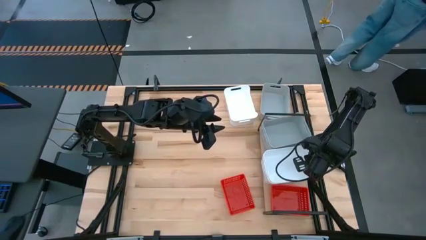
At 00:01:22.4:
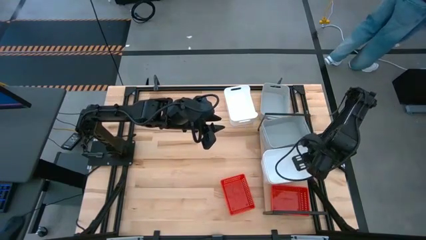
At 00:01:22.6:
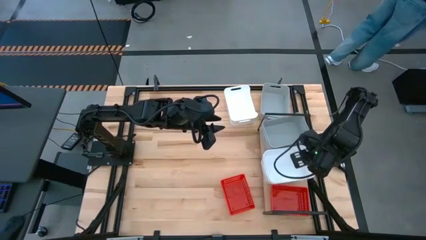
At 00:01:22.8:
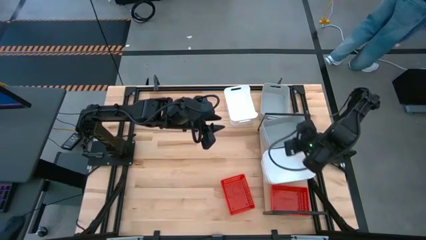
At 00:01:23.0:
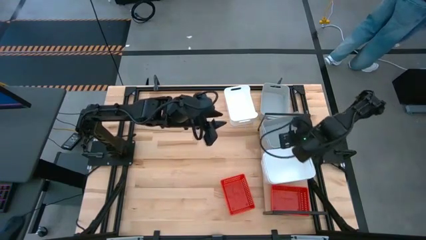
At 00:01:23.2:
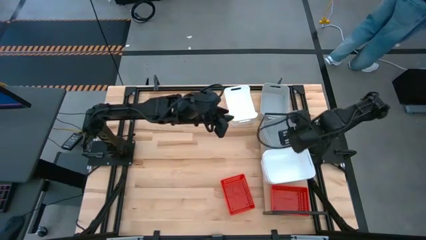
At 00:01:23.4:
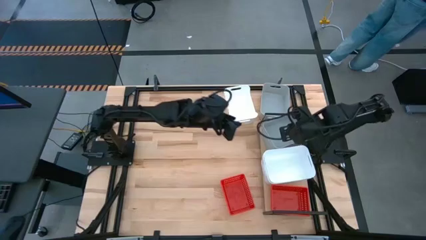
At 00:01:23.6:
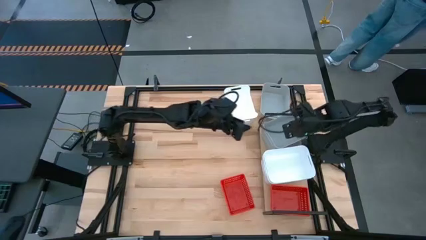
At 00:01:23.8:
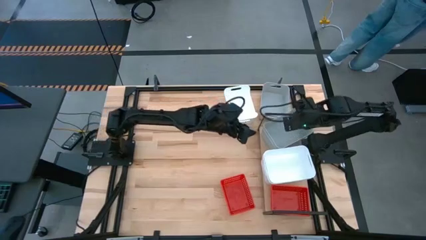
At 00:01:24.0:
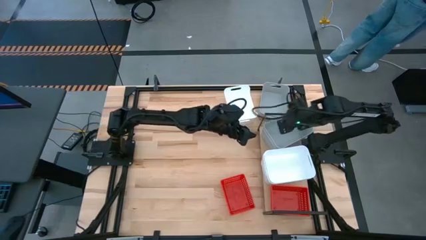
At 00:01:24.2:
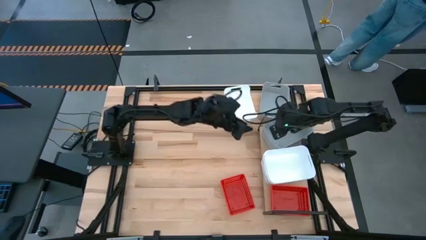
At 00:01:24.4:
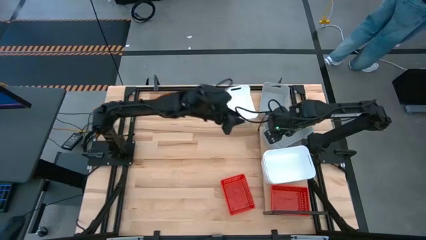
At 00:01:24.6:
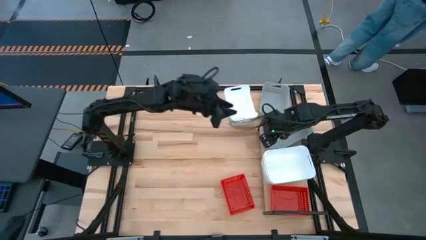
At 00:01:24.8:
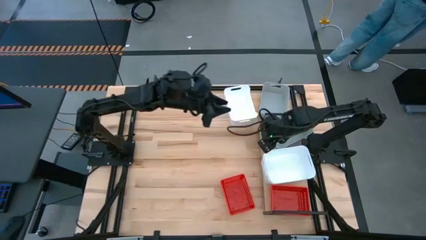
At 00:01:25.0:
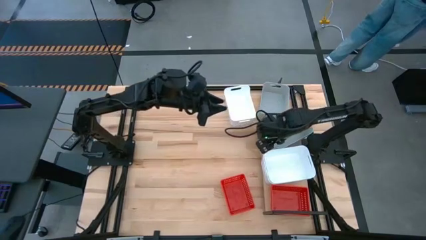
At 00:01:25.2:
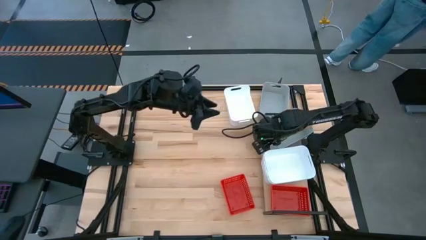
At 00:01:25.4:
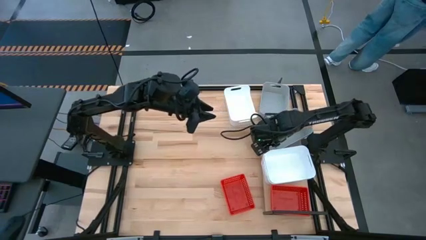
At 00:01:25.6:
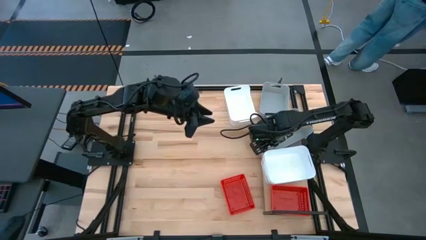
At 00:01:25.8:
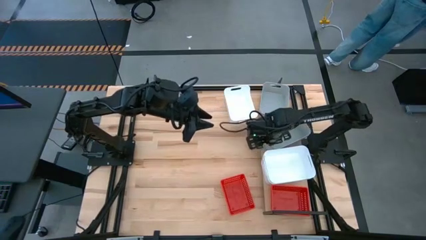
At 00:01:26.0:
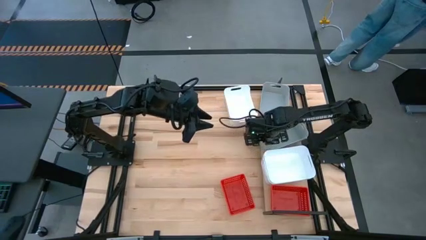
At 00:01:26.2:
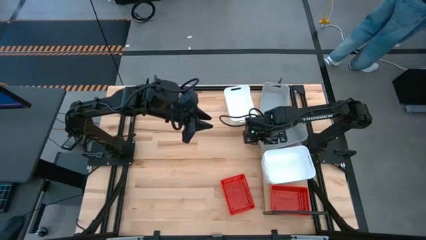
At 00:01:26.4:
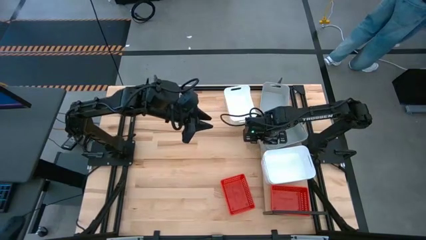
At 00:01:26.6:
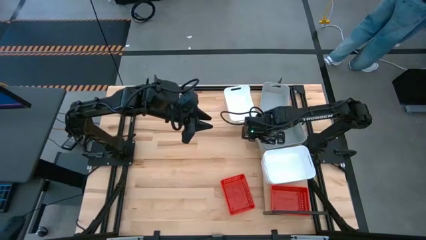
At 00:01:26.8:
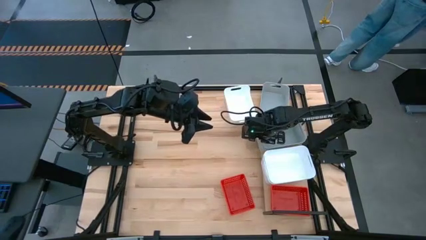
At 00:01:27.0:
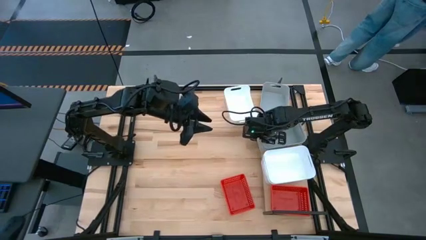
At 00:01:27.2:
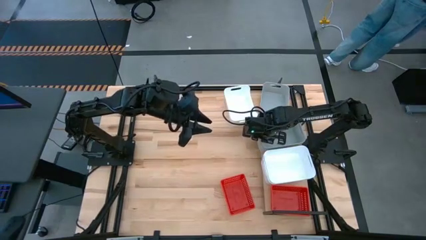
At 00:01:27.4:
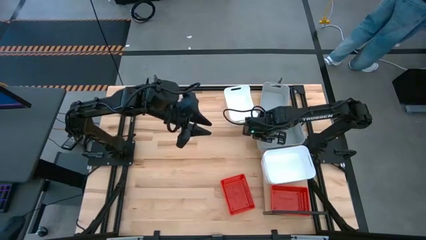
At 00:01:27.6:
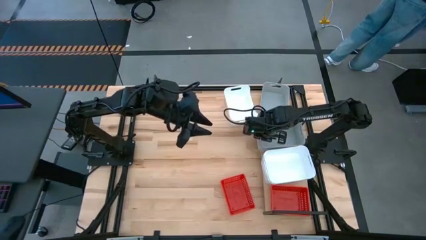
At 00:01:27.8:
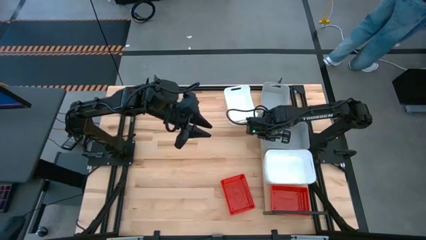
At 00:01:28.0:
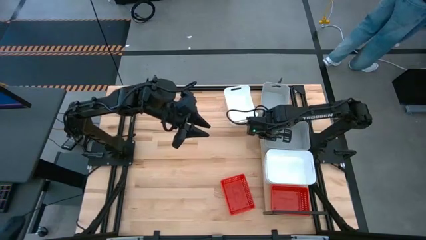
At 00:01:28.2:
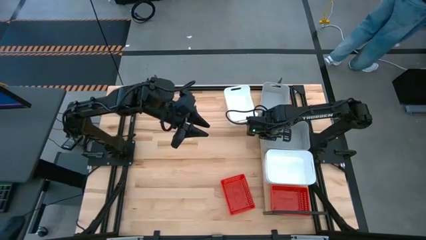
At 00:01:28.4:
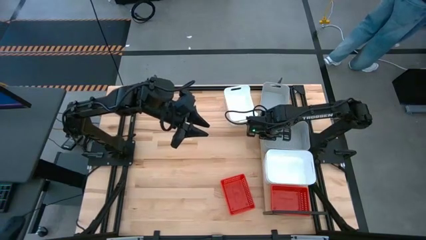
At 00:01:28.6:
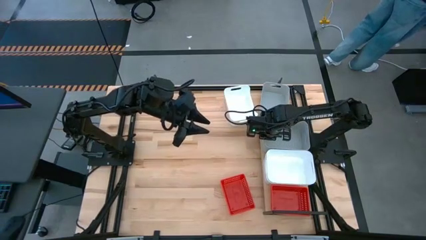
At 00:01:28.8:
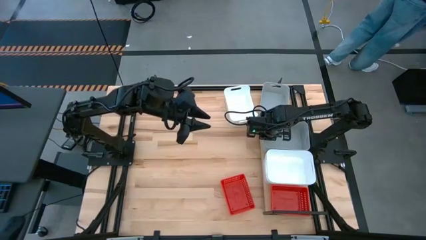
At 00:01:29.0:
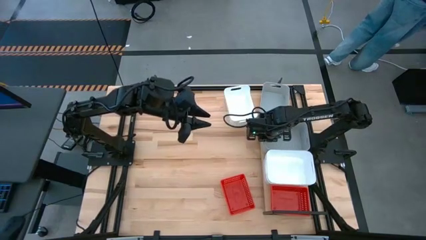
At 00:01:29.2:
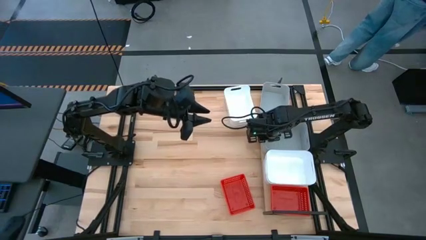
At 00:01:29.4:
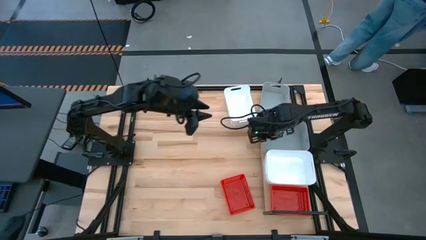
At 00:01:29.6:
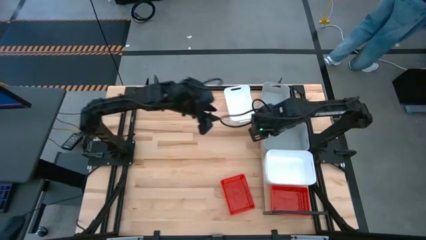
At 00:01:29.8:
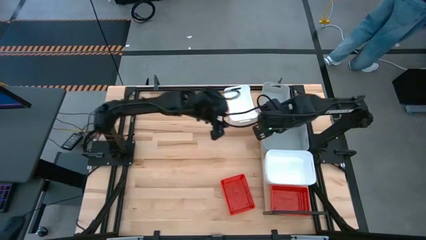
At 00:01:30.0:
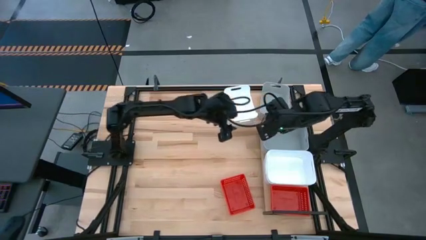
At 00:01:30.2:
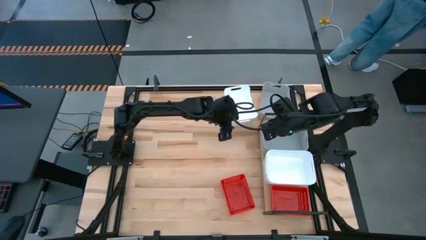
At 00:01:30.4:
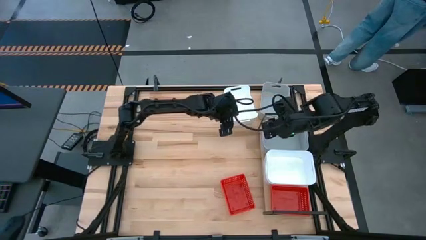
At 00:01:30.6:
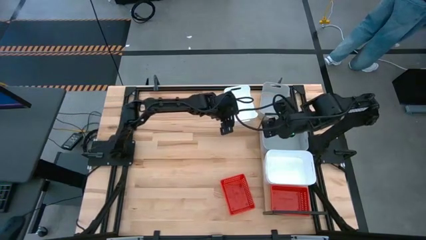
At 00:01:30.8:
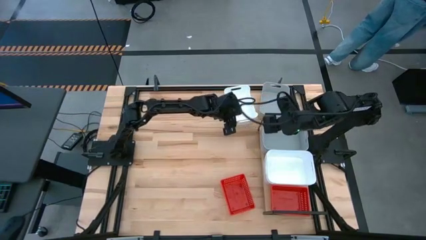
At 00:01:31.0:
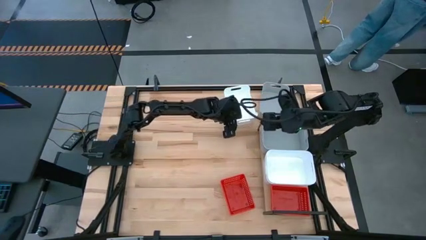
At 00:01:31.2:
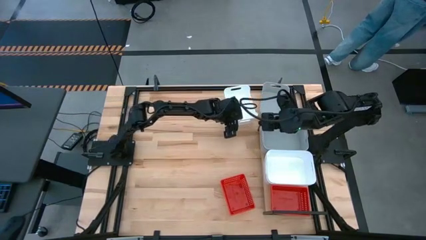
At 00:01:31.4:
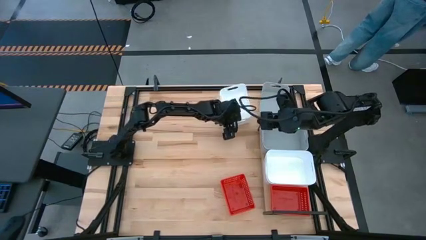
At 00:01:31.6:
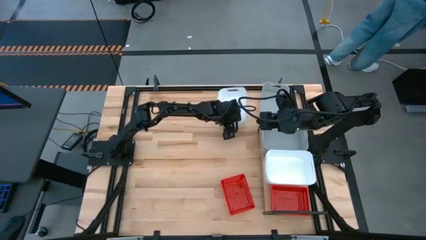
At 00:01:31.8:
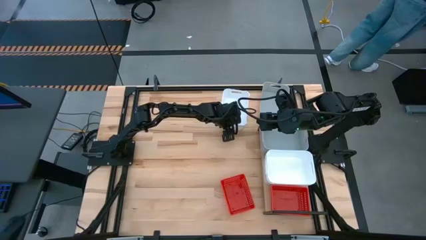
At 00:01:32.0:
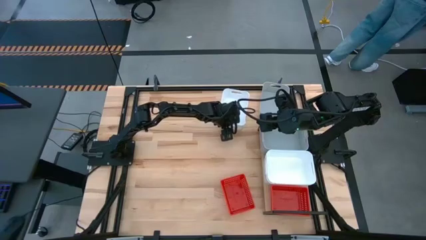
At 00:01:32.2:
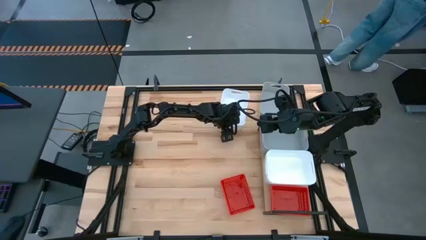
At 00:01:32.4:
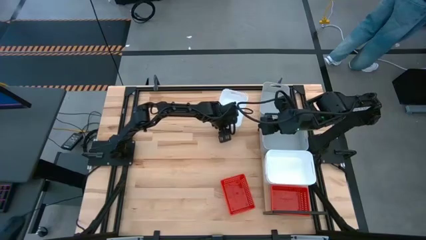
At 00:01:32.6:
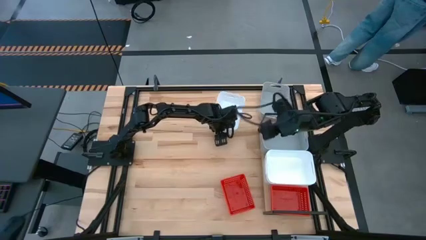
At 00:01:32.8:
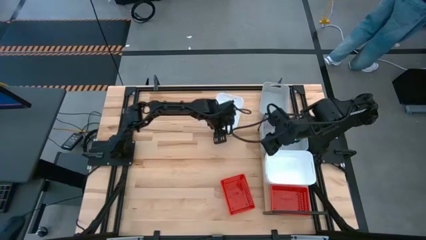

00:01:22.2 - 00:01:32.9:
Task: Stack baskets on shelf by color
Adjust the bins
